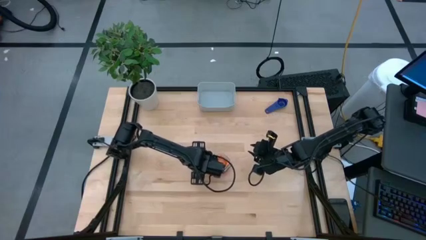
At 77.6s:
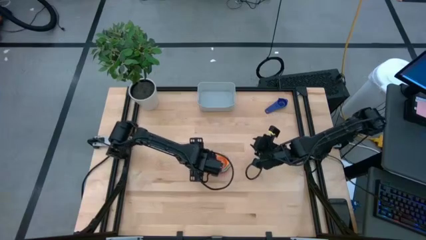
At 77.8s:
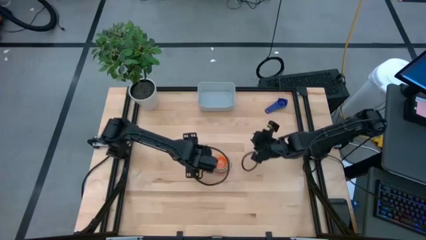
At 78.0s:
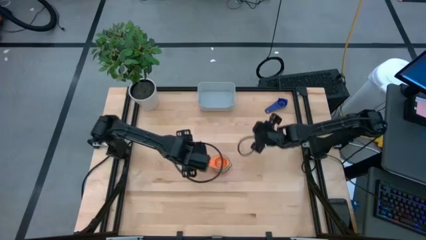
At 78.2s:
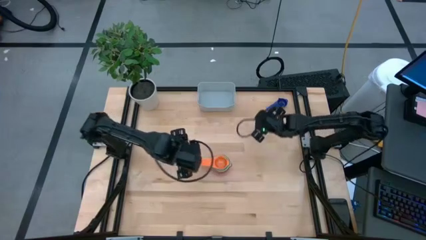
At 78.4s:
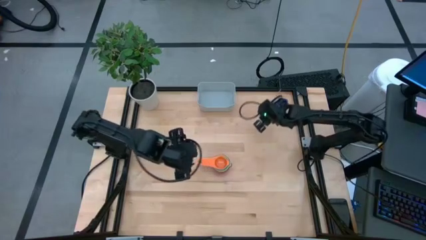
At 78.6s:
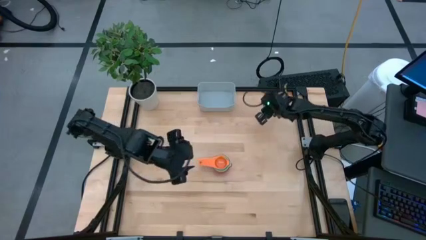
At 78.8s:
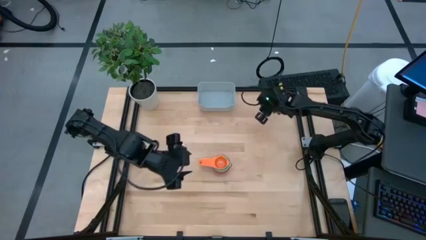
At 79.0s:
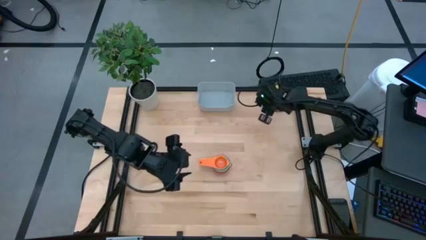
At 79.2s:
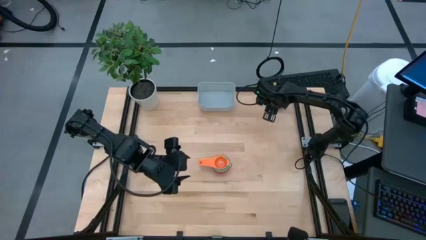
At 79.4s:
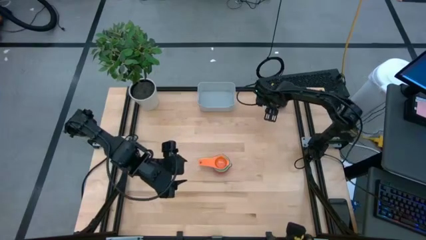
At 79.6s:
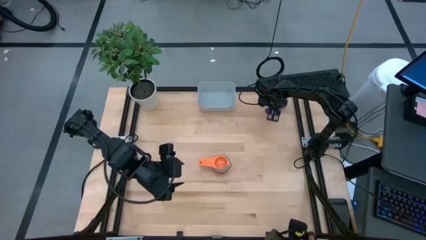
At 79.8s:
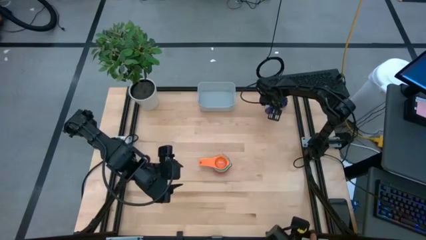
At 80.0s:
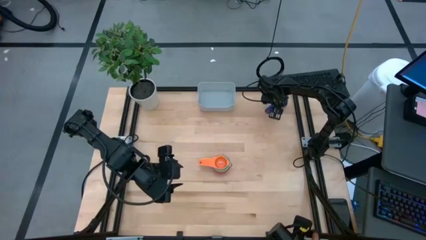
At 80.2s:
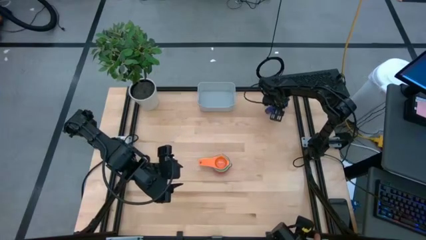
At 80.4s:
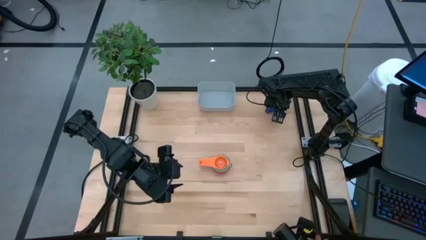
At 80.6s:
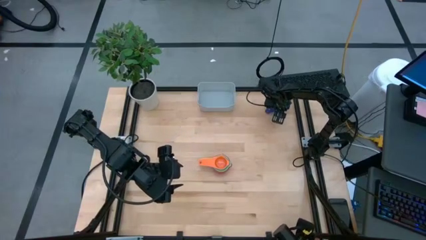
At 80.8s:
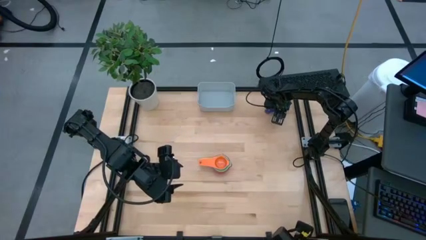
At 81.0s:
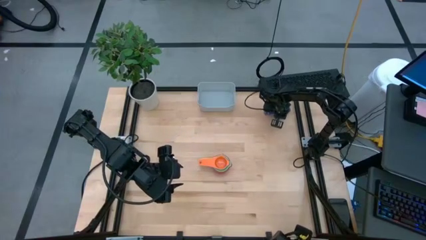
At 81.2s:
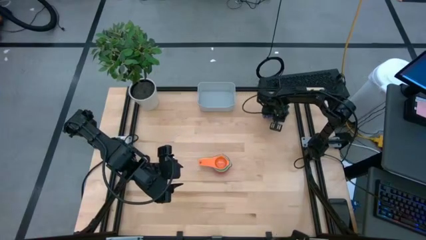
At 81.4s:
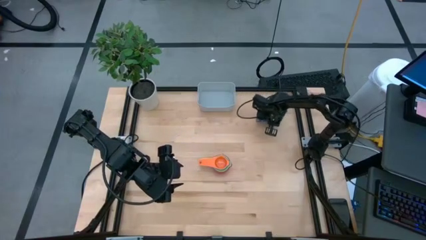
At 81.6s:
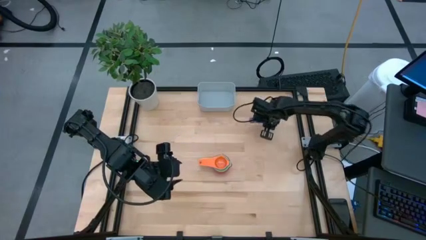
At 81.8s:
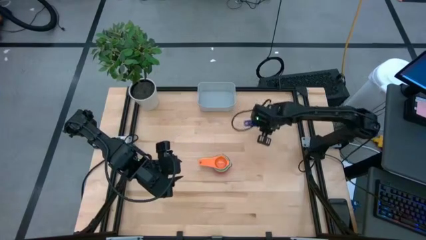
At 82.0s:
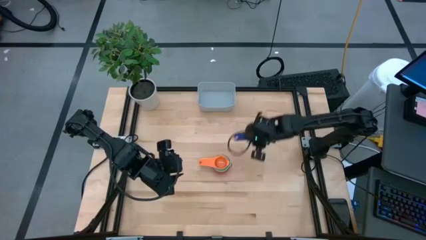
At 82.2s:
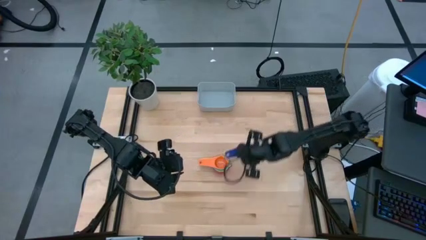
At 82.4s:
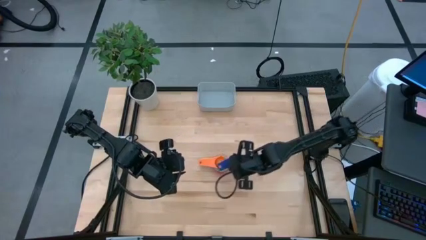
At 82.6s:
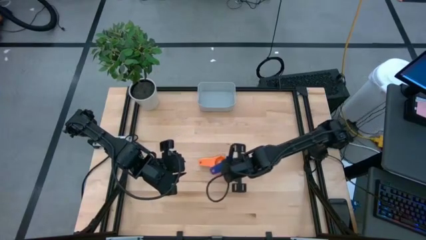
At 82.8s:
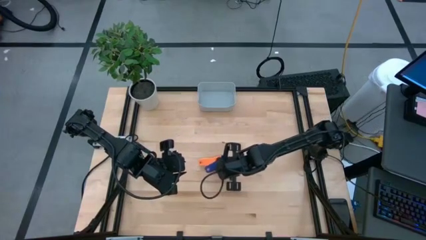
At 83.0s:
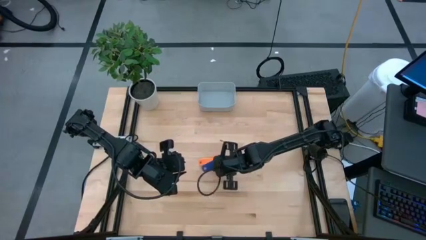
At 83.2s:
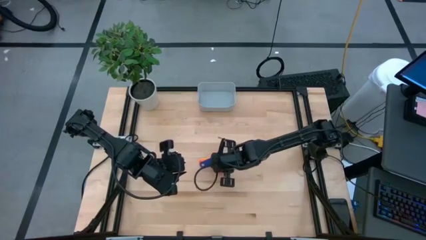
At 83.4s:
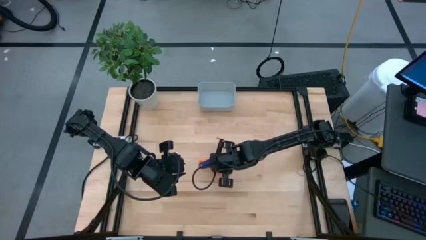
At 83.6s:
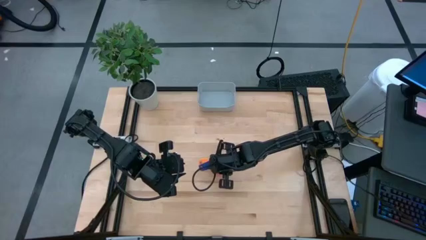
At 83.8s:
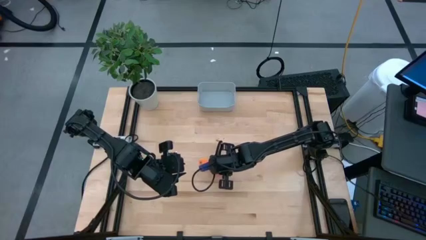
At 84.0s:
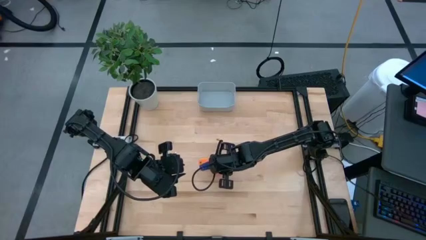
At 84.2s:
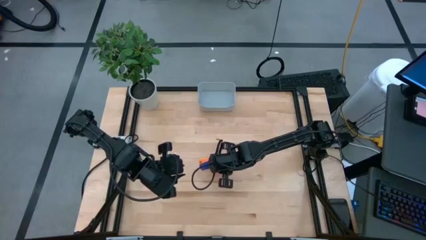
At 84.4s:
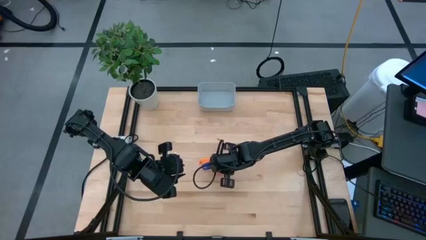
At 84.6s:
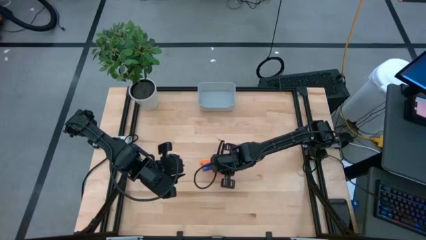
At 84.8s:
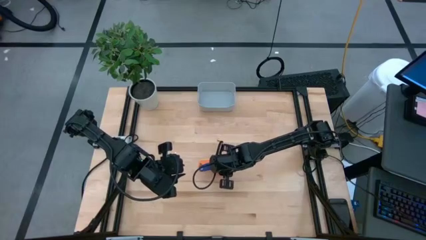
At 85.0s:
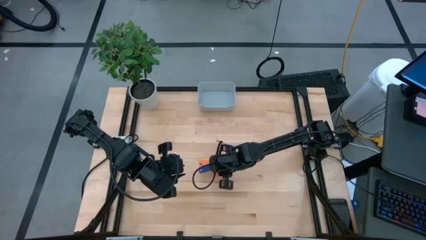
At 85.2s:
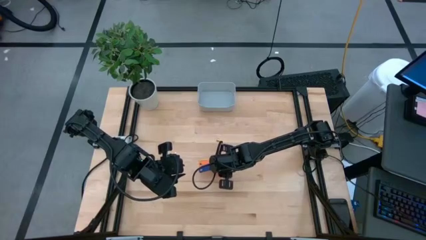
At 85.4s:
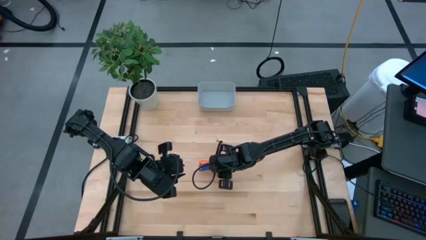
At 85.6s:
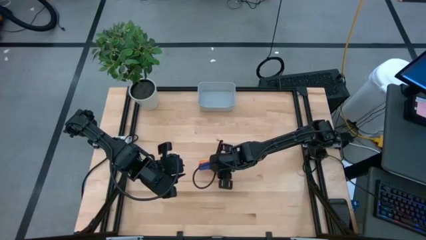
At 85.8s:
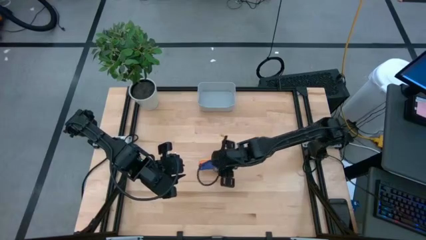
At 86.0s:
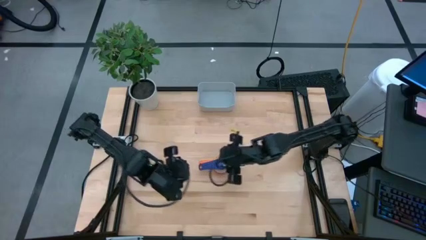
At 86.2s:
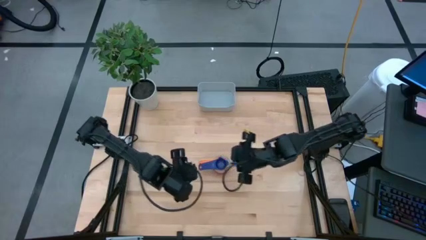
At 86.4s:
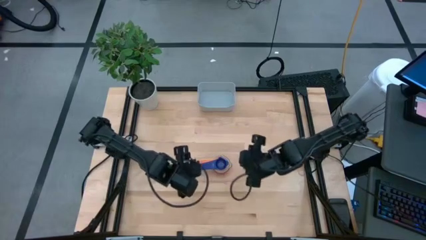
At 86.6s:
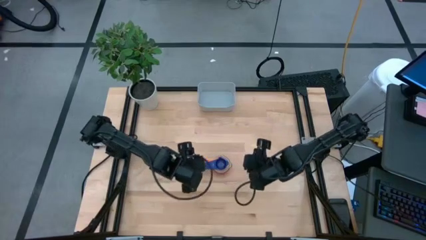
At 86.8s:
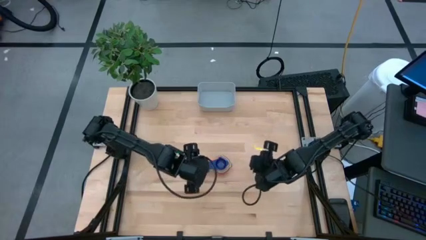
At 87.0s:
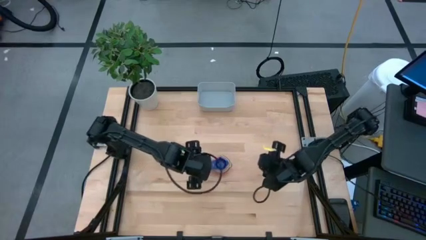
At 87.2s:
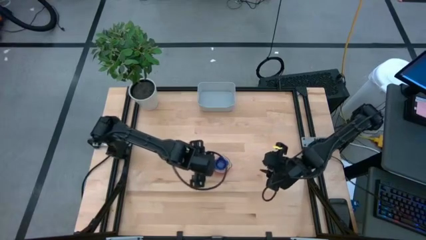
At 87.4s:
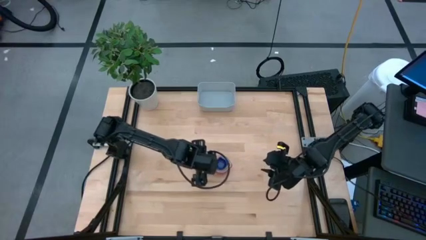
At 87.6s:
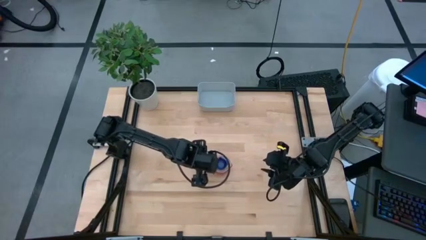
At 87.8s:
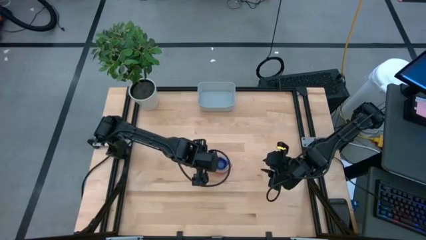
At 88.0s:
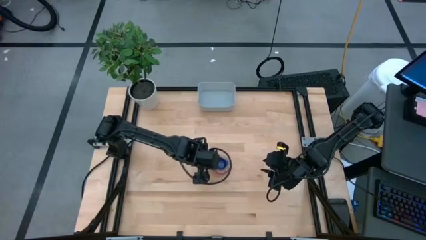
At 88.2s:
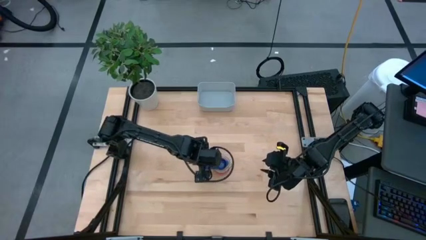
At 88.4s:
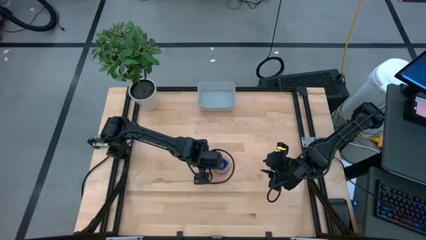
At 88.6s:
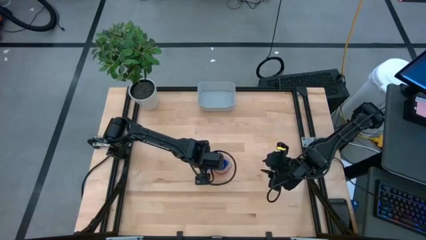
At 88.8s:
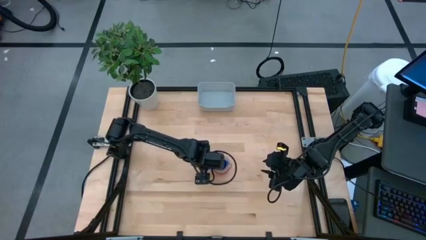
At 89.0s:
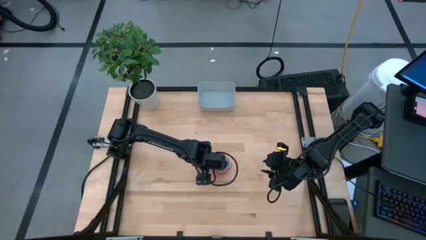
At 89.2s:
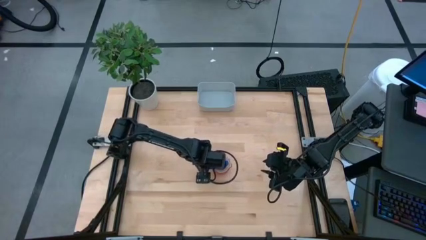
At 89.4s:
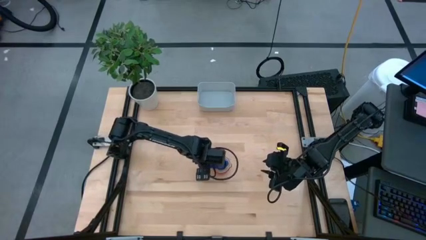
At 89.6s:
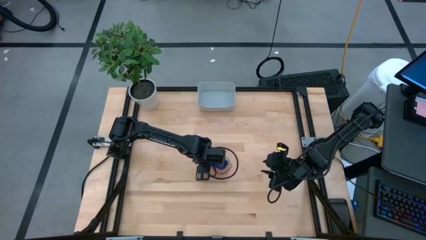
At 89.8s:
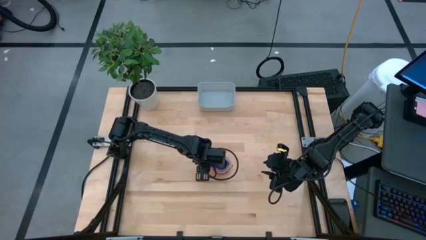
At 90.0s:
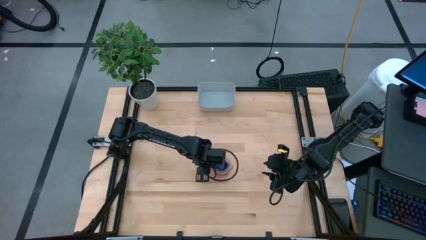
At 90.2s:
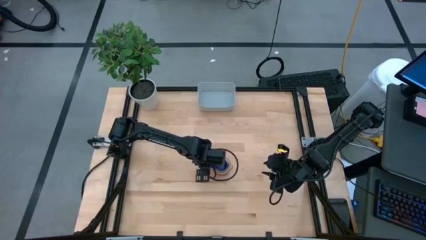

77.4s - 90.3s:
Task: Nest measuring cups in basket
Stack the dark blue measuring cup on top of the orange measuring cup
